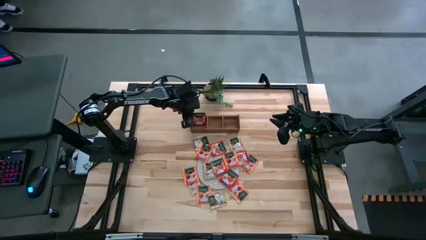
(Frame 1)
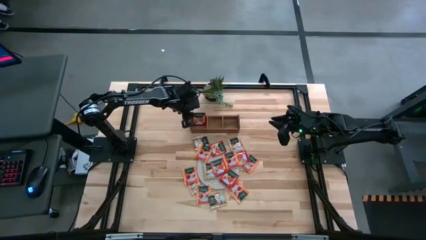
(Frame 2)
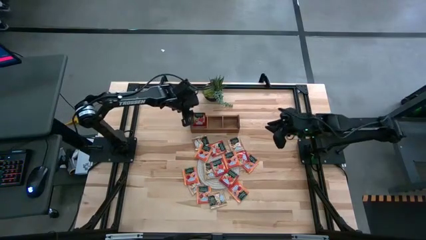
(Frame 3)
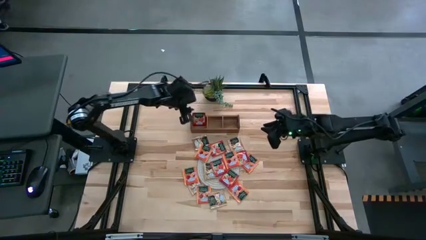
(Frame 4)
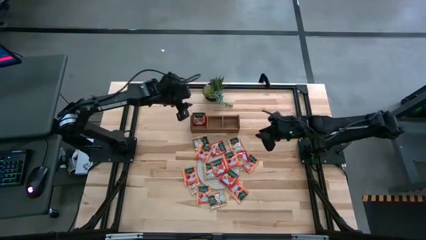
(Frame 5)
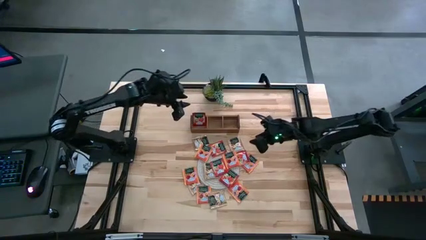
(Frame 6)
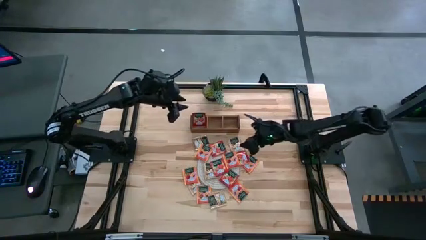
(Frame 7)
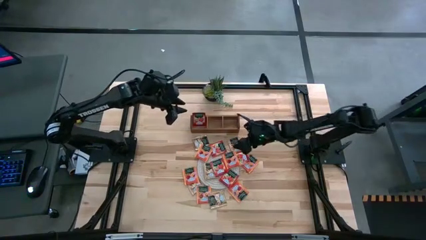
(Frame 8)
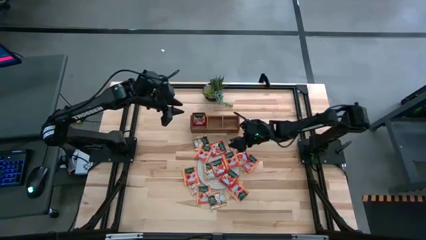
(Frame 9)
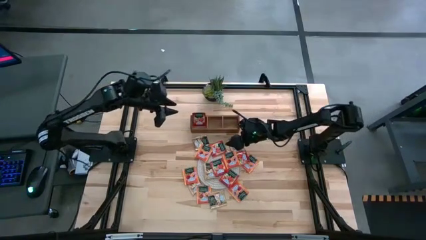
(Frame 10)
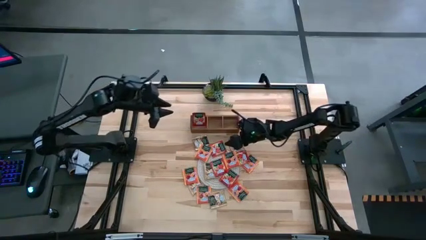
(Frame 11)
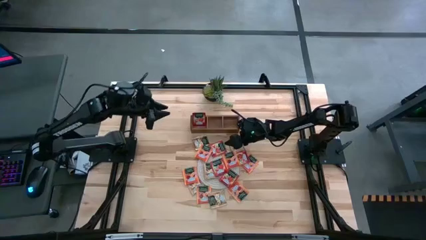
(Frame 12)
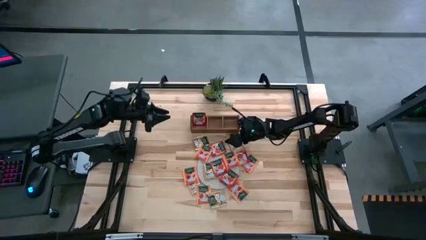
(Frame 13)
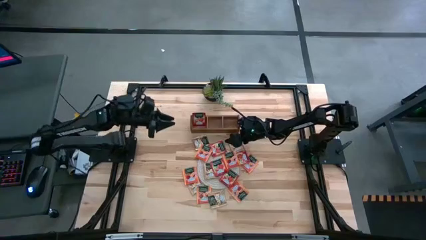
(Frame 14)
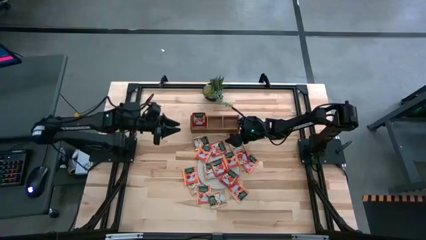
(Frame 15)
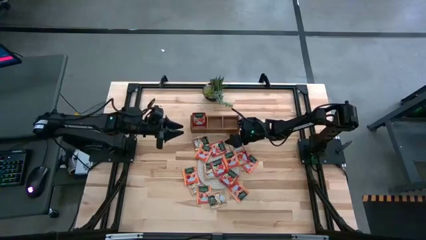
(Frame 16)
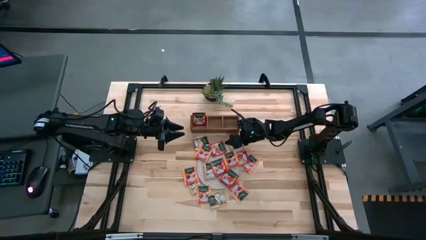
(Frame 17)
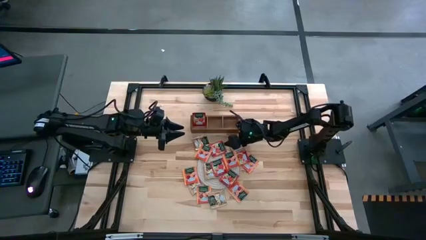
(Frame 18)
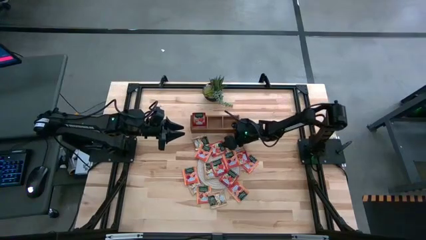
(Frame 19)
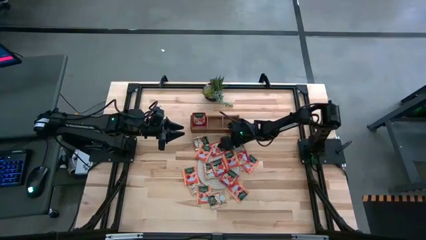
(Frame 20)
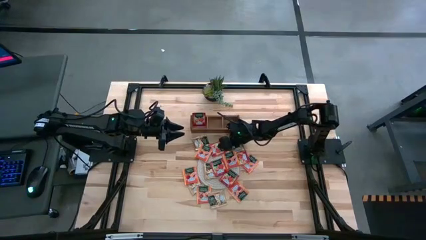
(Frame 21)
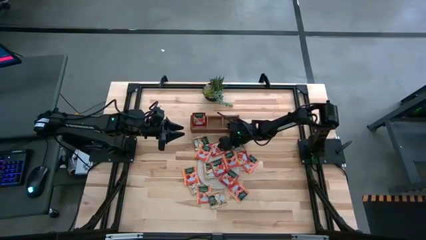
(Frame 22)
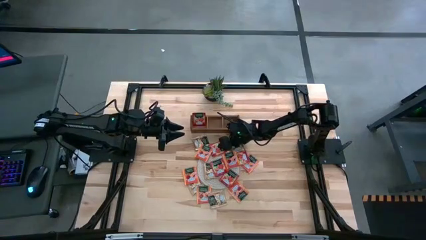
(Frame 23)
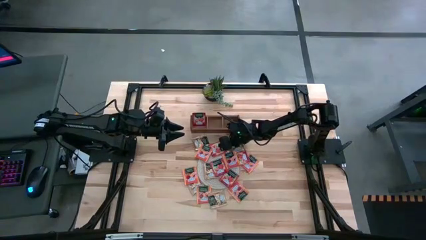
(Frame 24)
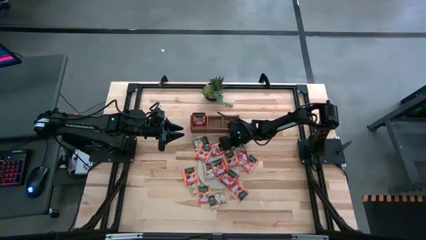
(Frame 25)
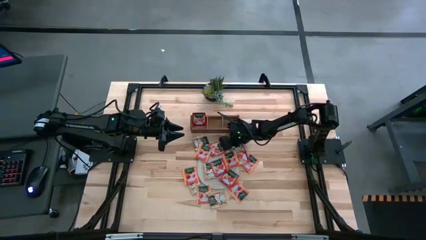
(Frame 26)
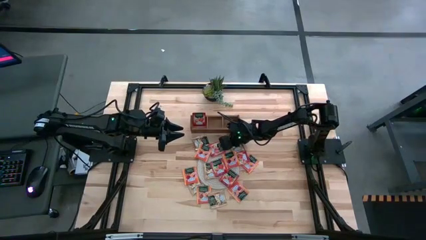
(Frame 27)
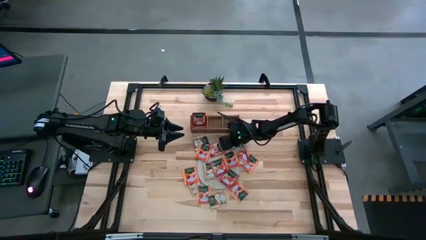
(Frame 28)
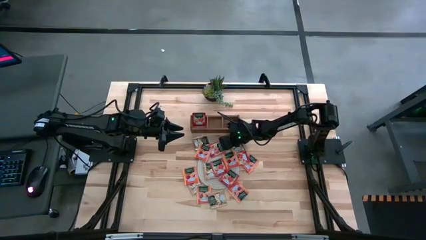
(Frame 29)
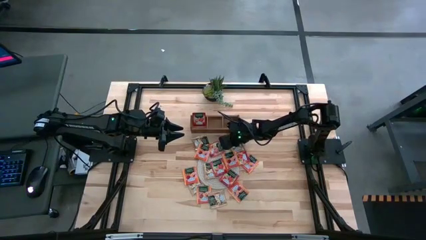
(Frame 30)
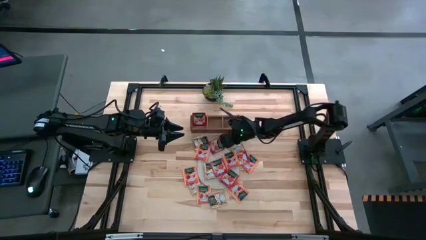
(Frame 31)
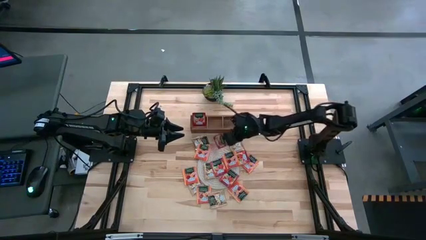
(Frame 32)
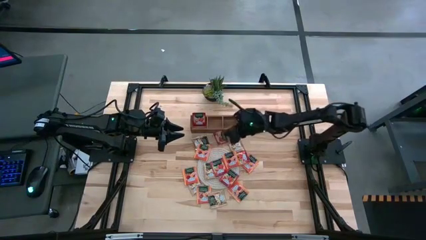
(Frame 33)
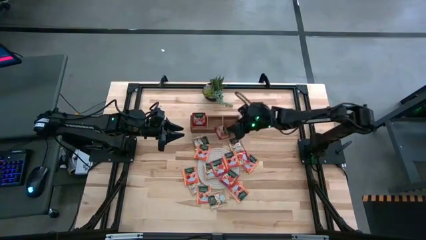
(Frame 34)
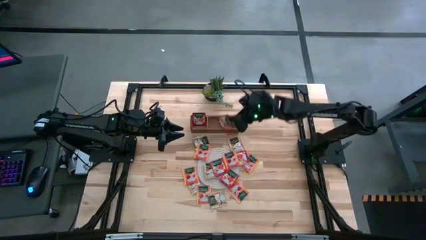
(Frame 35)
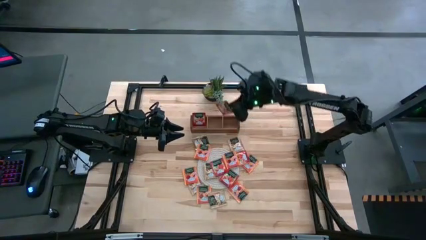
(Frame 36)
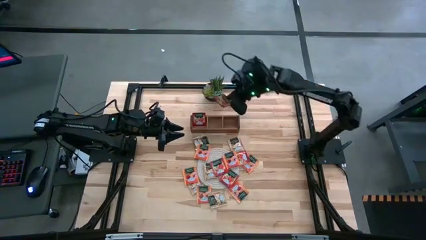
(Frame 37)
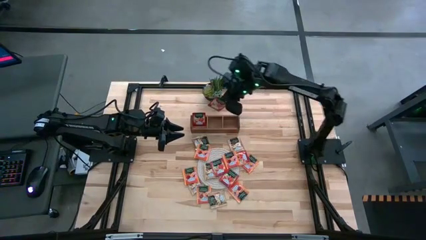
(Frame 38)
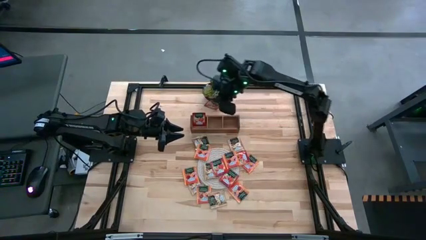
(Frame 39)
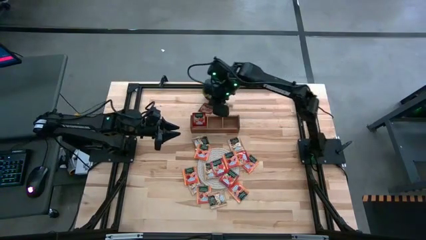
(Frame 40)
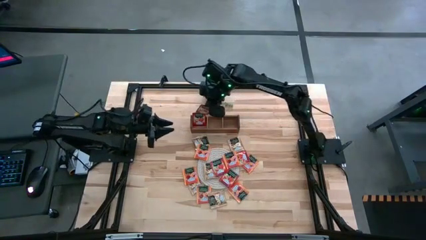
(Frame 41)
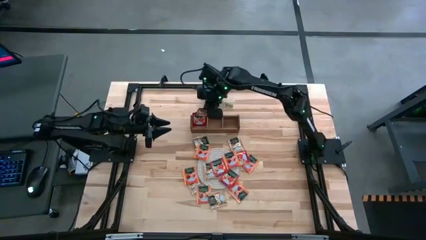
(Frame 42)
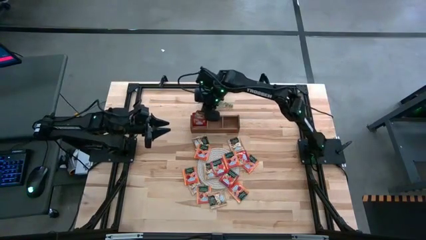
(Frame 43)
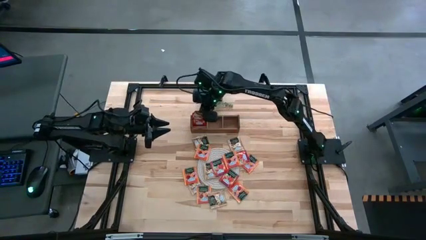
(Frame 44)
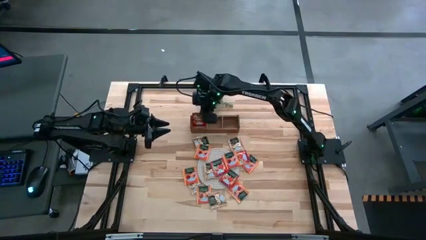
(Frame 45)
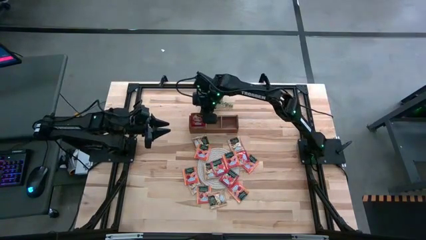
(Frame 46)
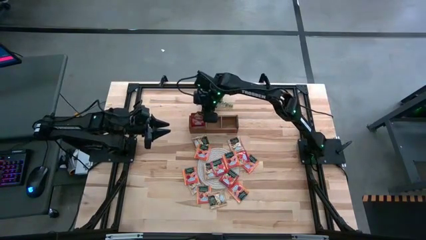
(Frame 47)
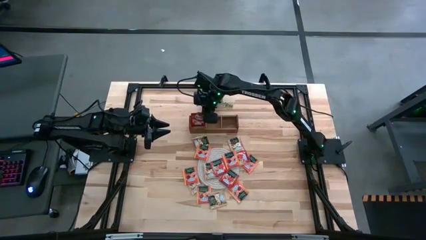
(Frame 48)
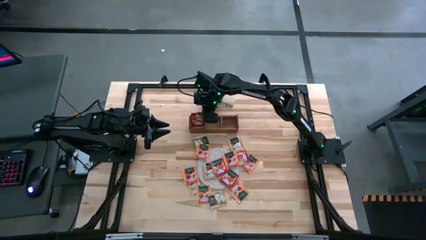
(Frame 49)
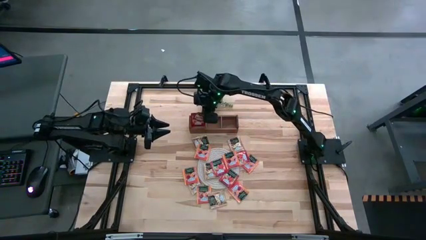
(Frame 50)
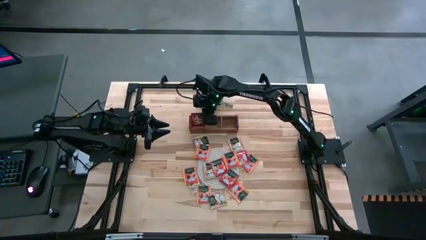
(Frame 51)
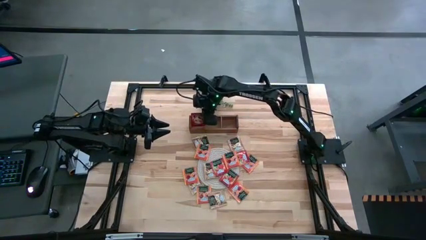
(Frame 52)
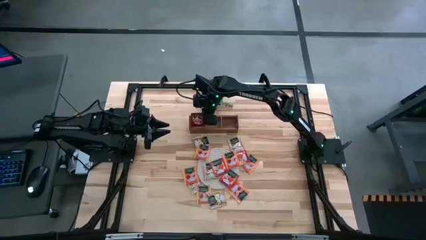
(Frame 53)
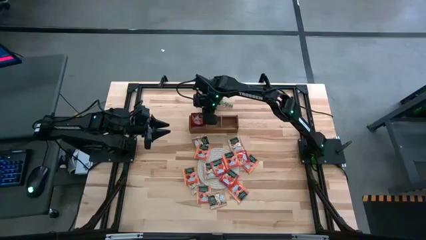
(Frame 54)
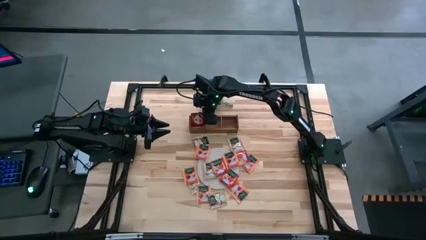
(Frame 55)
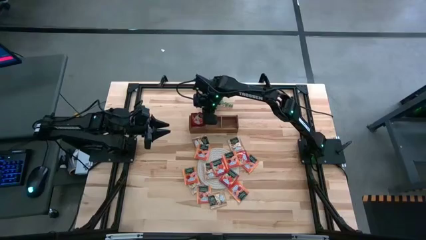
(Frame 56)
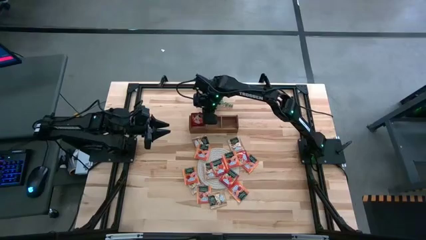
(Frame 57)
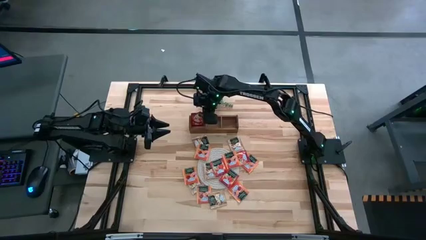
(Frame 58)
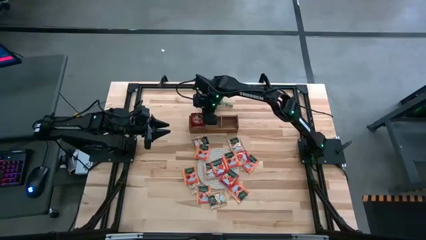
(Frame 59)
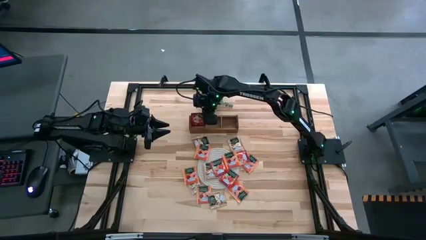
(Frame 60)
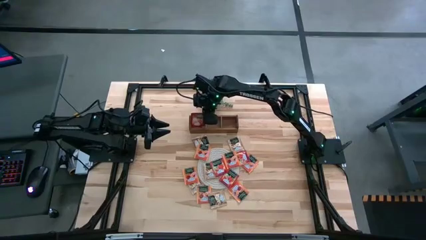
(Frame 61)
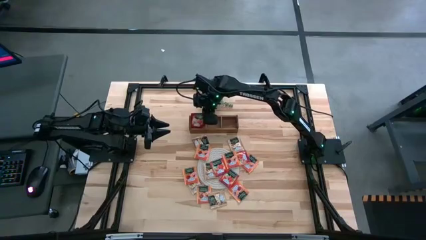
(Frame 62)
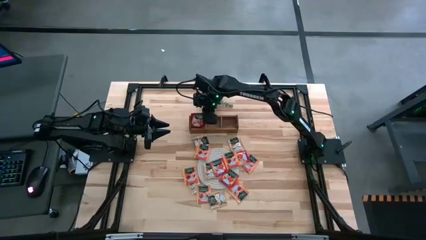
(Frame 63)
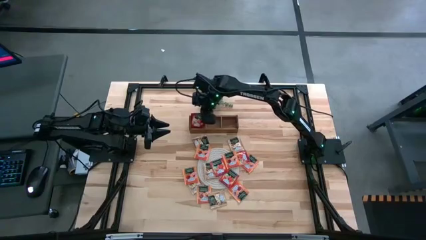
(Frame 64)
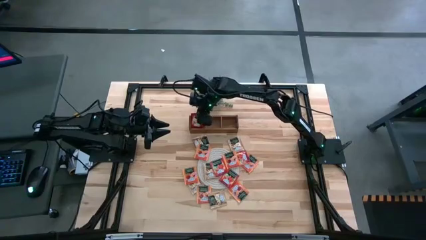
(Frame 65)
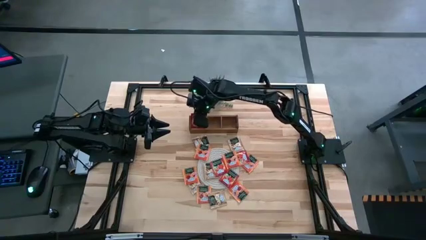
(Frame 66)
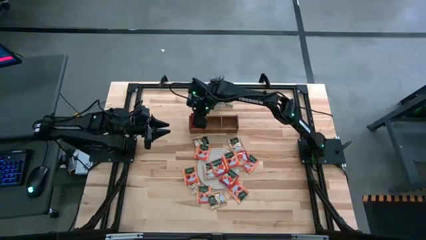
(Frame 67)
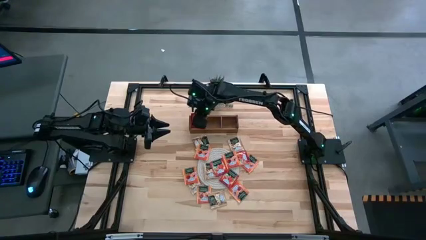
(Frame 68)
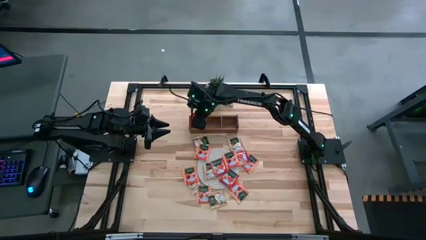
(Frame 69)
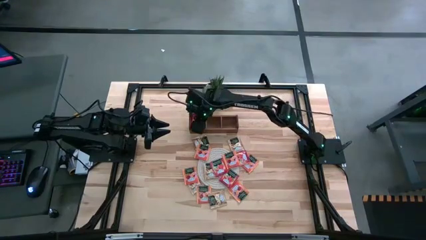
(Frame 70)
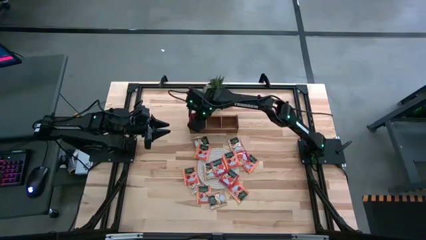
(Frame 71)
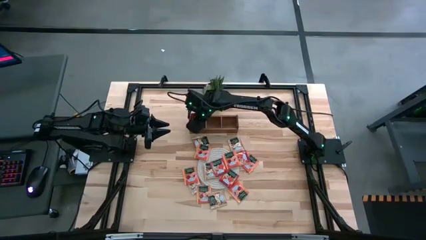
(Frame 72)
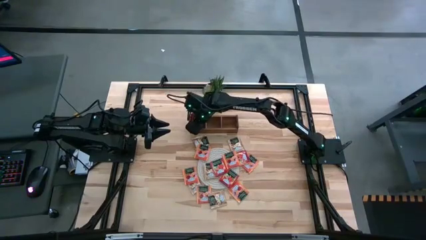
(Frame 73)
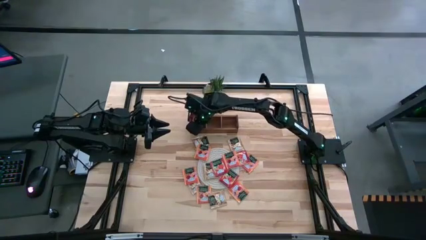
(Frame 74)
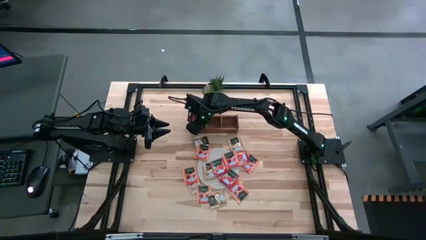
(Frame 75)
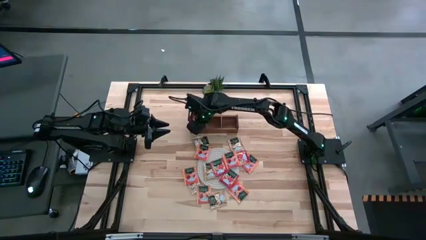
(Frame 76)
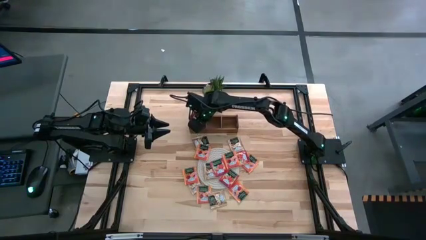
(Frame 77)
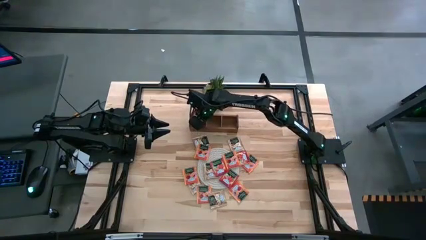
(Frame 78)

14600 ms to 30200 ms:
Task: Pick & Place Tea
Put the red tea bag into the left section of the wooden organizer
